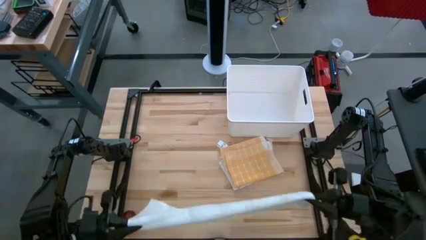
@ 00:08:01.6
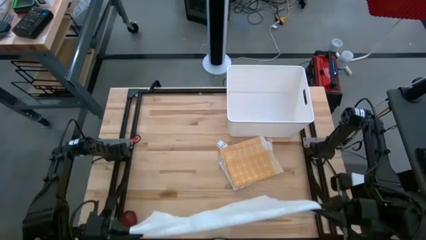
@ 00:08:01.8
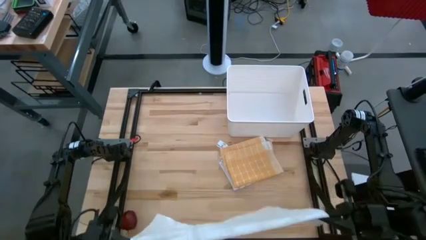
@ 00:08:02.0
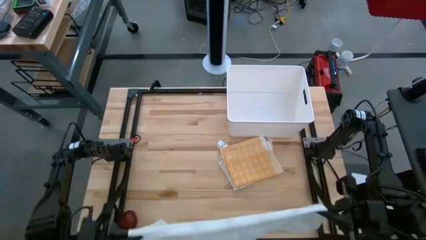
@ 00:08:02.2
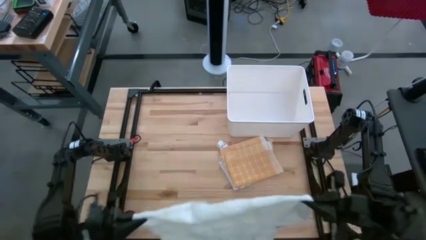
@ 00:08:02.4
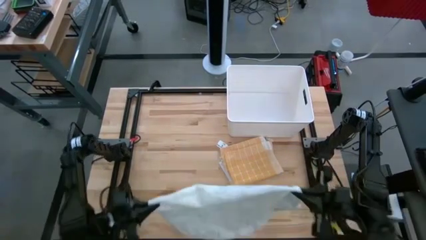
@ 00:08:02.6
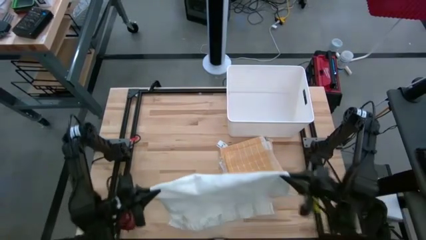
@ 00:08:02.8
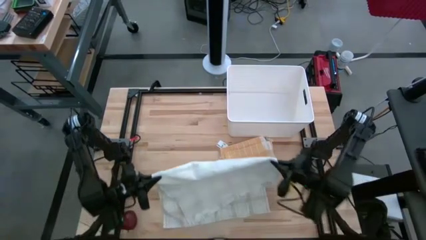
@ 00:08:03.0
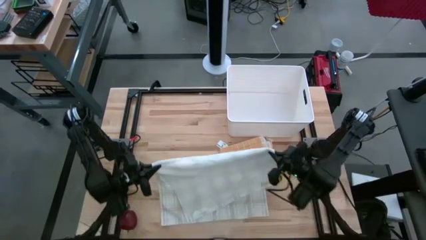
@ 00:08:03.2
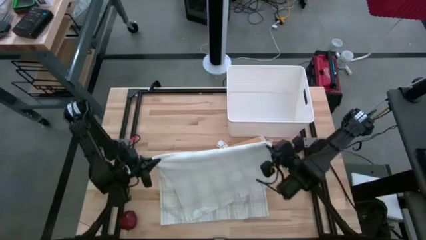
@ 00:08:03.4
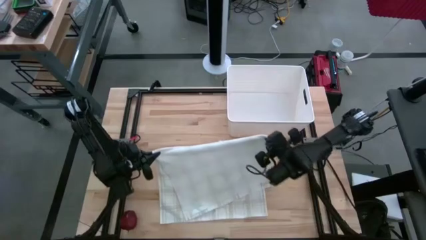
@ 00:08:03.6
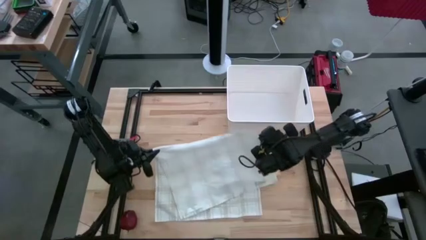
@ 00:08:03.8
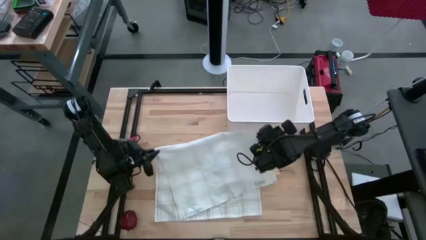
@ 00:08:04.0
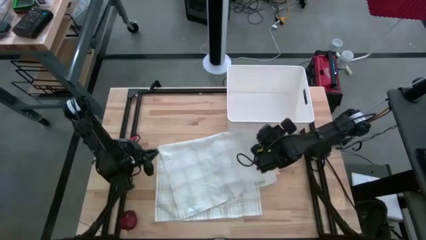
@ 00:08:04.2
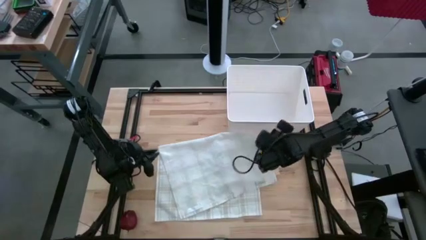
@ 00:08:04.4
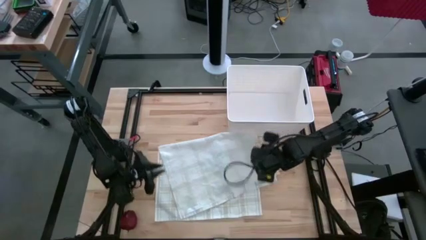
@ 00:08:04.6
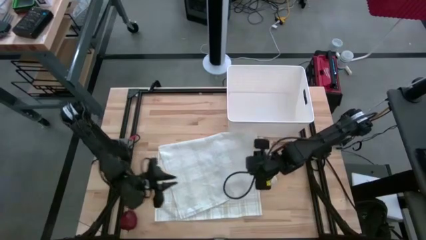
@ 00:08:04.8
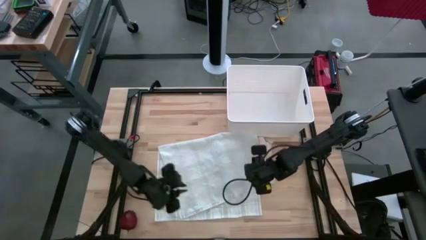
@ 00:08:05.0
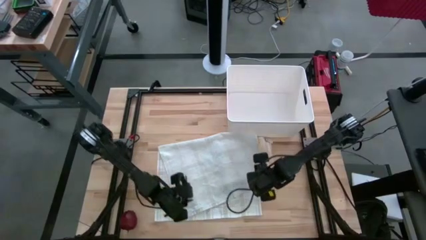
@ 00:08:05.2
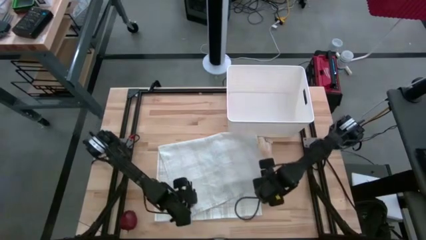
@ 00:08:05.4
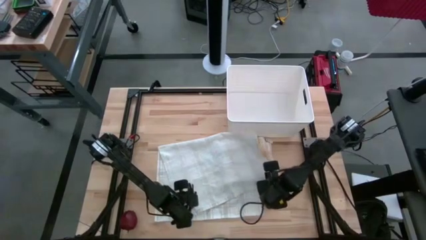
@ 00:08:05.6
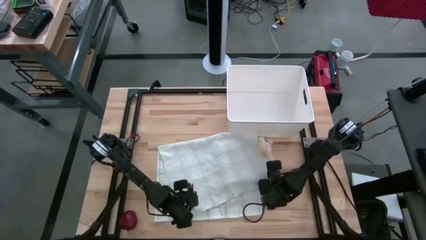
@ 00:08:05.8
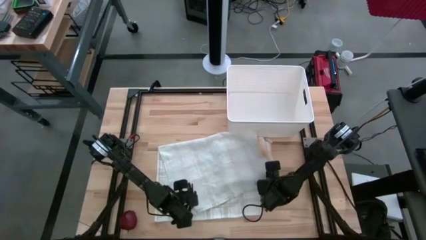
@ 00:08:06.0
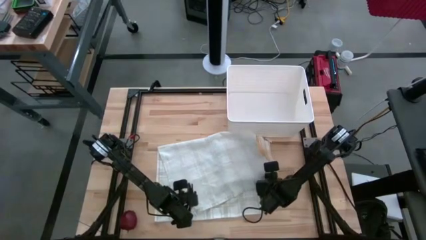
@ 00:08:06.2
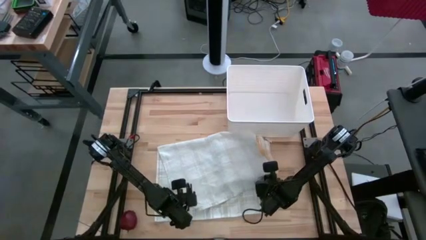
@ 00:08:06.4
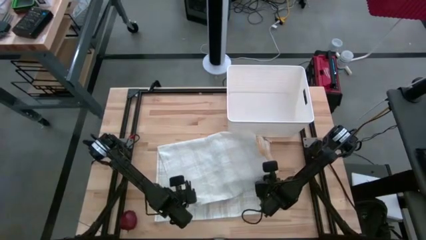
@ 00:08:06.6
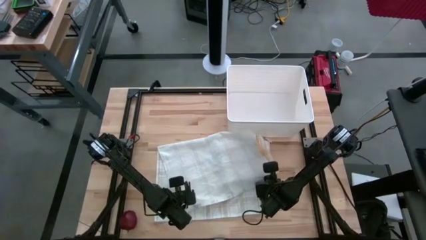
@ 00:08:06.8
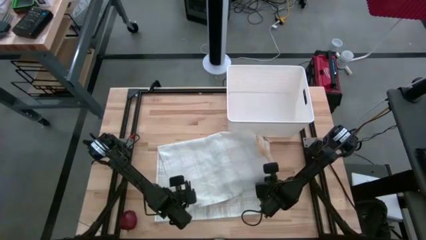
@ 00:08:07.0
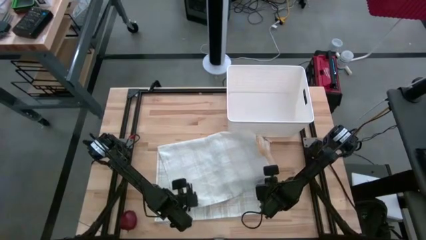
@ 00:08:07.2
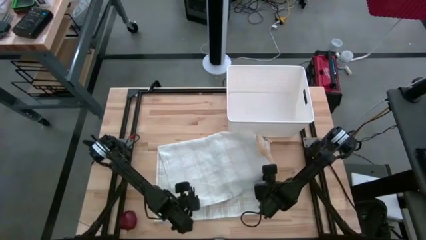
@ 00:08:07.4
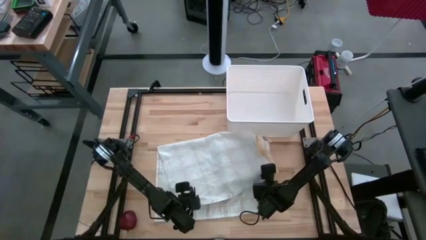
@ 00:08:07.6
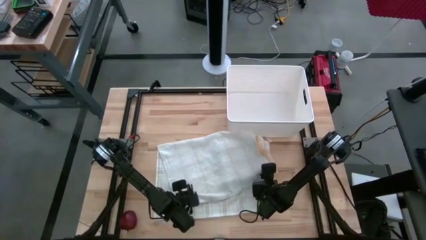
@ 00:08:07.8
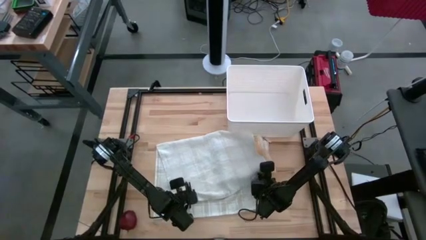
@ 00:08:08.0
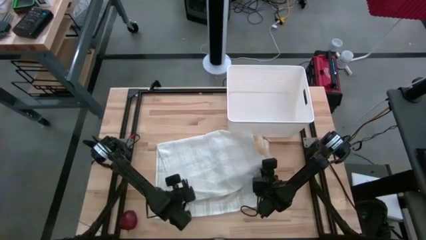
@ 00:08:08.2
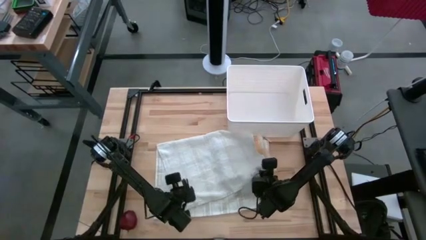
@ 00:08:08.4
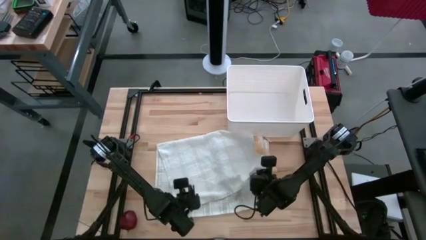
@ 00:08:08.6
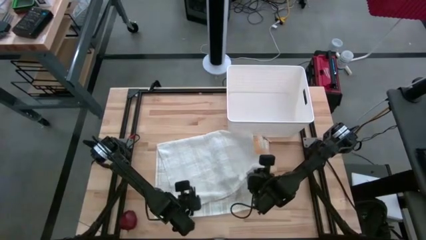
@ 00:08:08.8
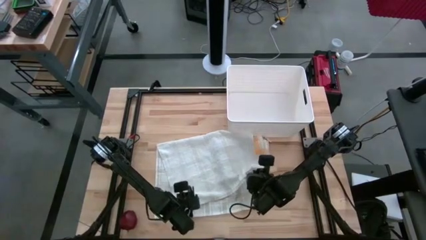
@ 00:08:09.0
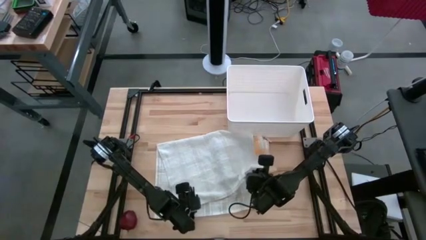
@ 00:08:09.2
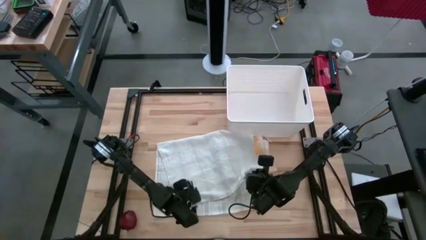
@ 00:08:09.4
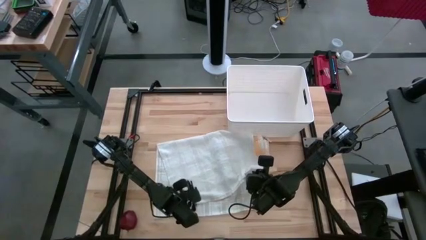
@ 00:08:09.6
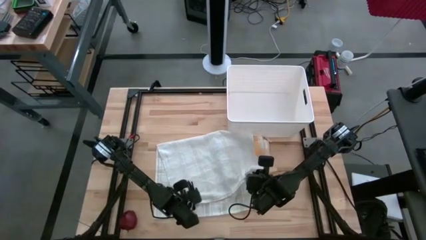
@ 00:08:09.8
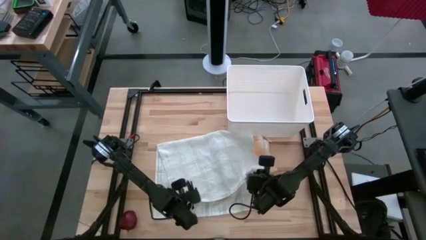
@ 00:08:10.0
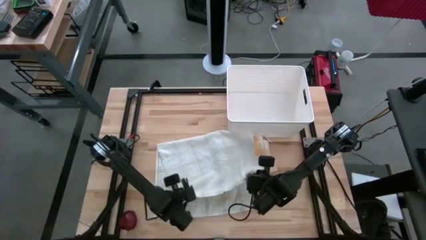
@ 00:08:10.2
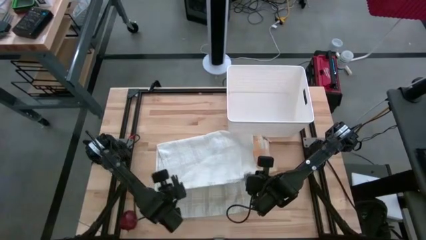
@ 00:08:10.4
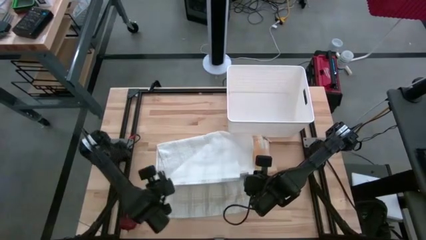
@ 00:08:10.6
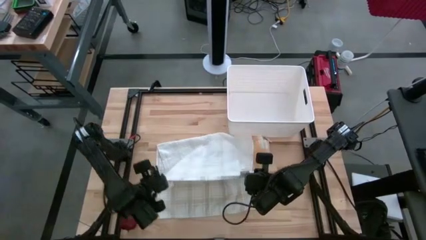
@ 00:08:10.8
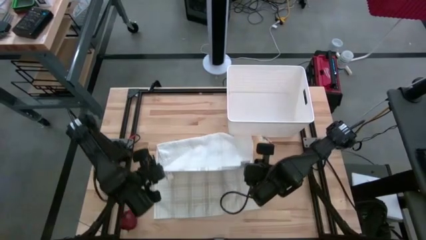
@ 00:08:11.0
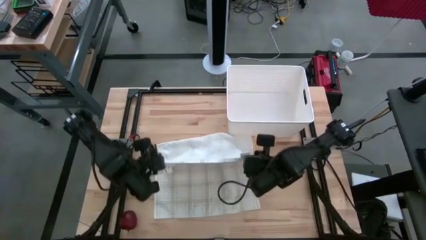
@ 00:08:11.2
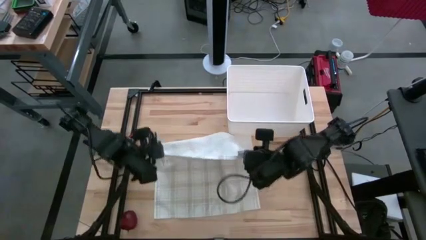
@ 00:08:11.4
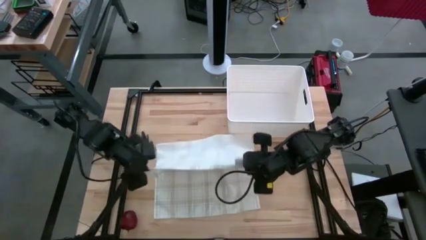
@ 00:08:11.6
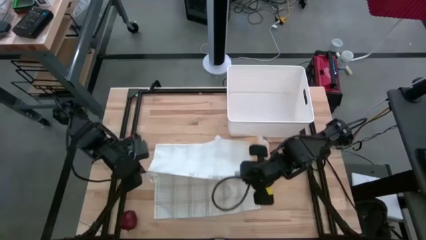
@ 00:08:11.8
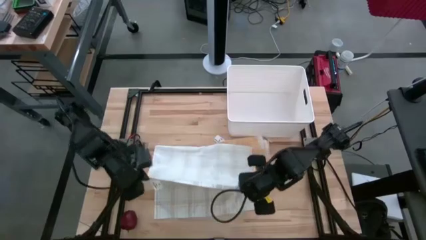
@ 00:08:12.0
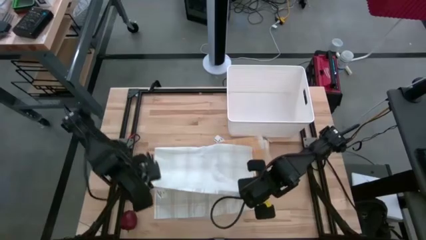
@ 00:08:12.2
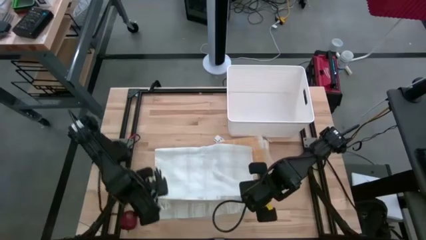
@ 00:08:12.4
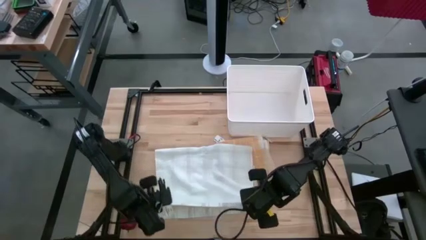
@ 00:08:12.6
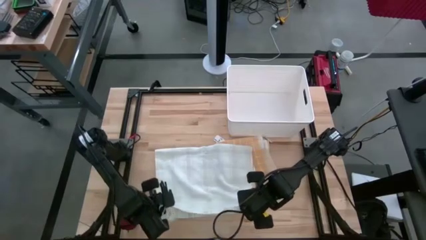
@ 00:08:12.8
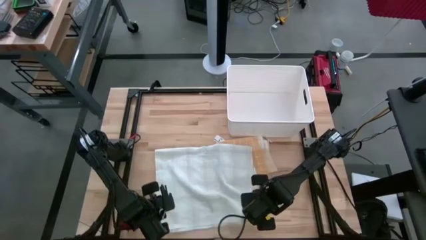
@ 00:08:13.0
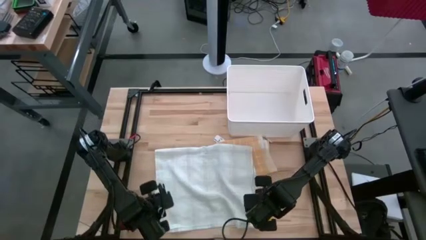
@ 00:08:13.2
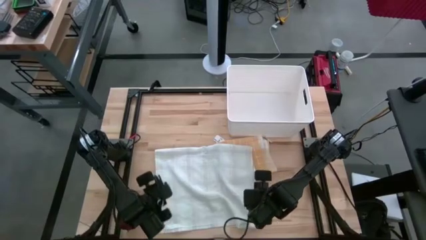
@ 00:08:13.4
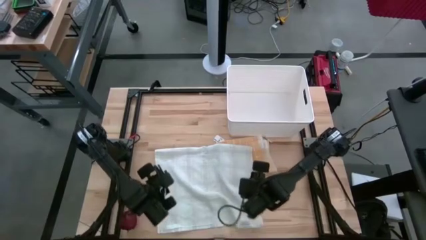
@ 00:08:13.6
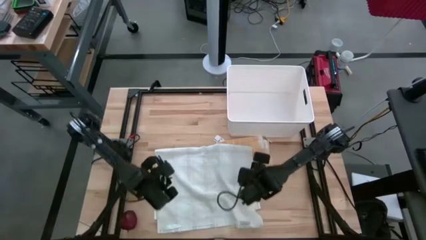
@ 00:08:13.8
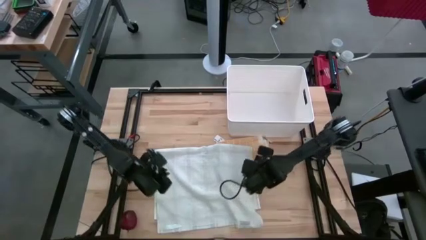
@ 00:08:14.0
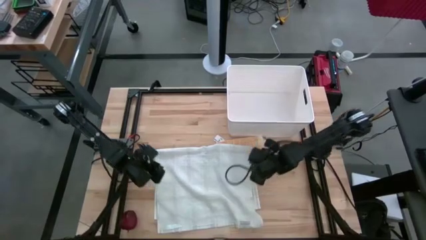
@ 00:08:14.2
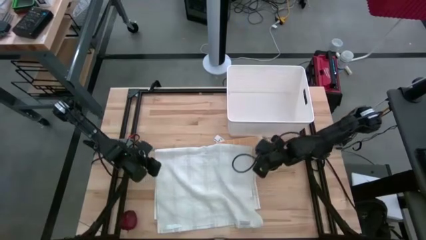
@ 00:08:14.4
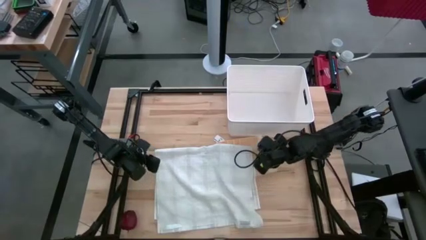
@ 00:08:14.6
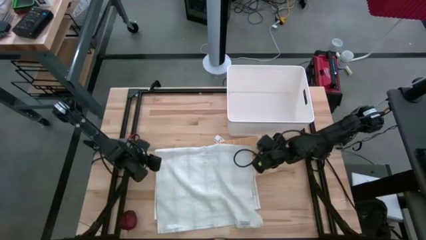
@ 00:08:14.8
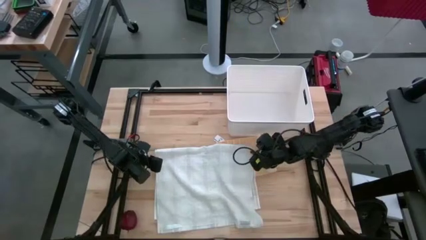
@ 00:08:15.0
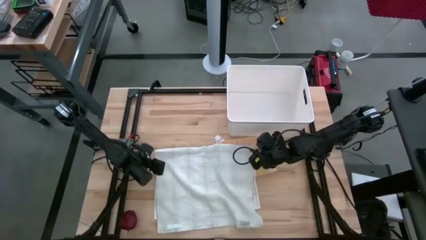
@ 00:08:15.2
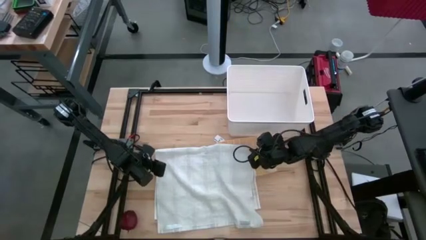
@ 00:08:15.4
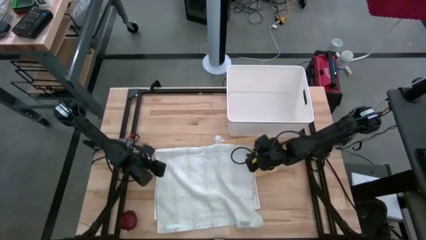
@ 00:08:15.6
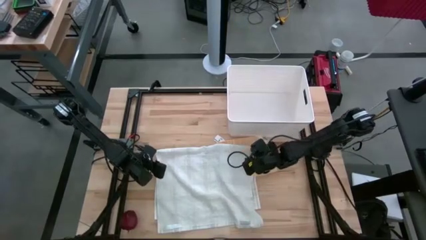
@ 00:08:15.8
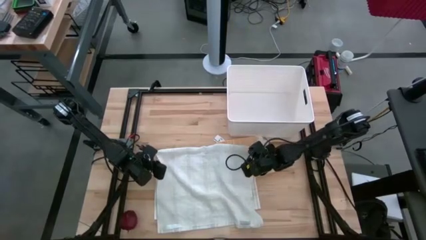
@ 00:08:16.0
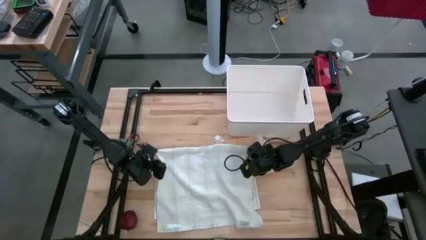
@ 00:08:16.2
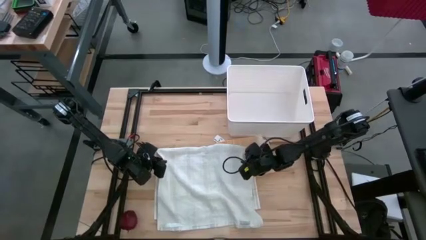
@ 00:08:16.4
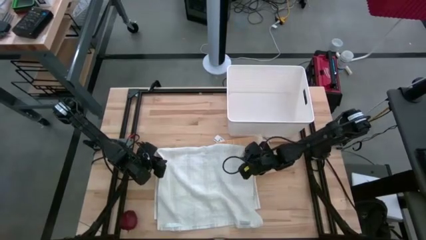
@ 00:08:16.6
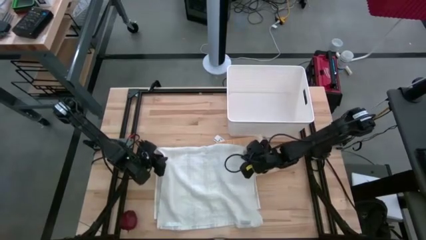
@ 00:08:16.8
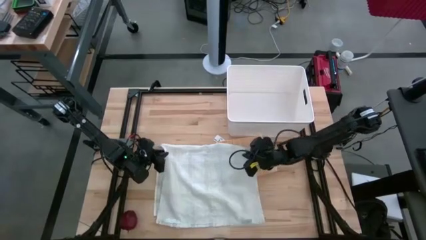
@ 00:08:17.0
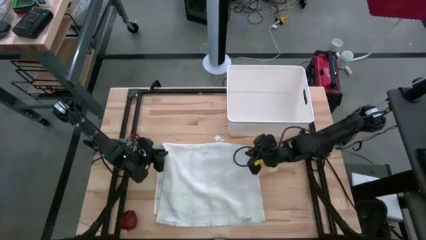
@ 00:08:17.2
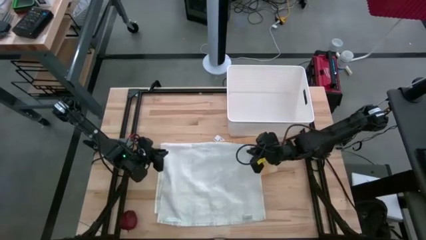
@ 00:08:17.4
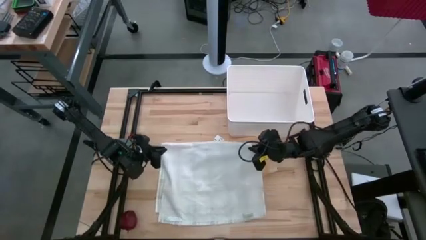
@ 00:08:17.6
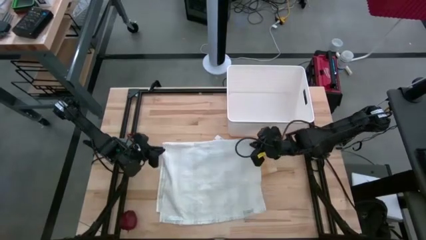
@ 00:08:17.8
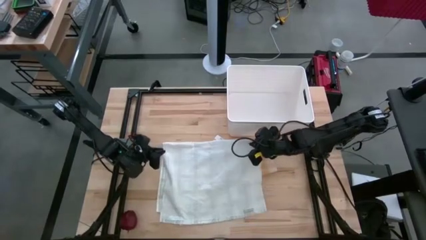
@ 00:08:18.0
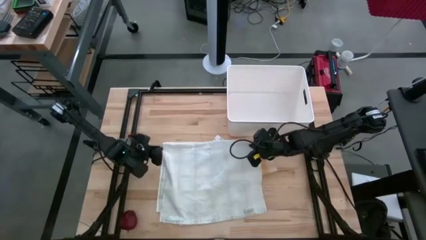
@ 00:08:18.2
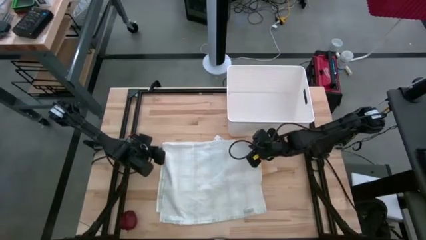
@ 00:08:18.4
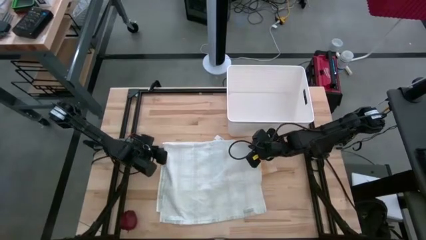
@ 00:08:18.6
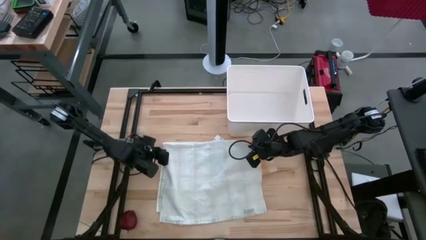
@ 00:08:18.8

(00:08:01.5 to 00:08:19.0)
Task: Fold towel
Fold the white checkered towel
